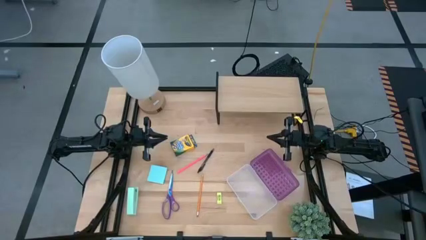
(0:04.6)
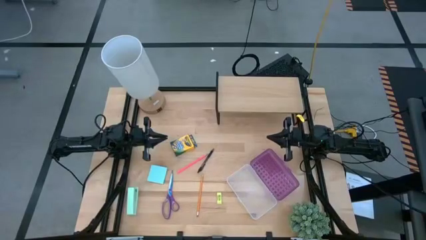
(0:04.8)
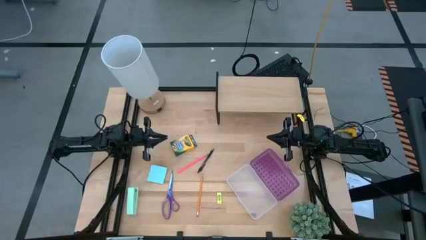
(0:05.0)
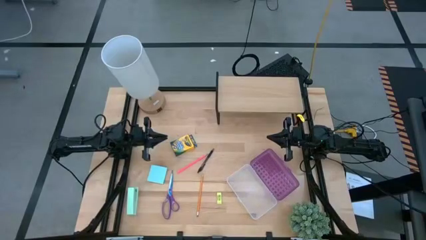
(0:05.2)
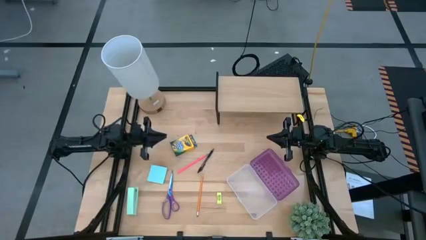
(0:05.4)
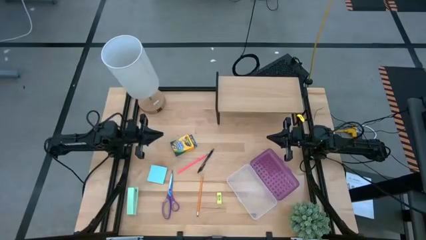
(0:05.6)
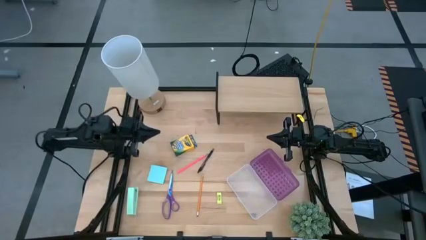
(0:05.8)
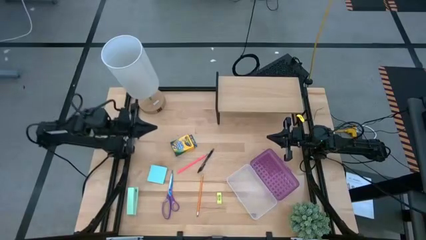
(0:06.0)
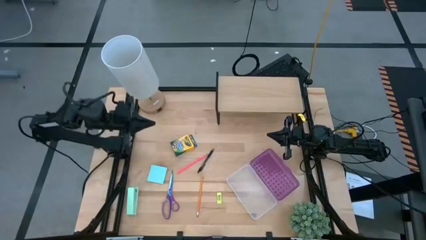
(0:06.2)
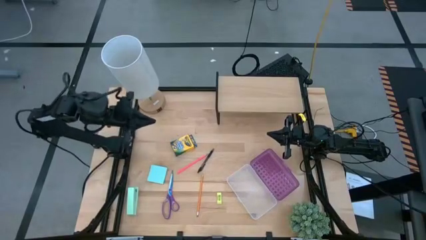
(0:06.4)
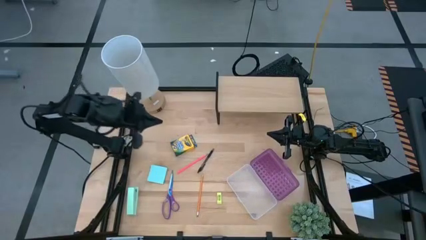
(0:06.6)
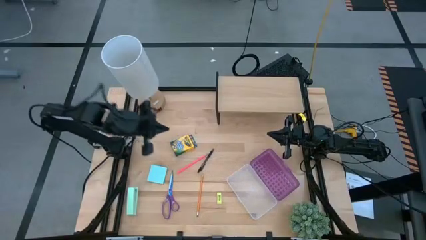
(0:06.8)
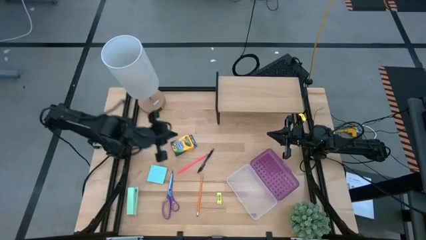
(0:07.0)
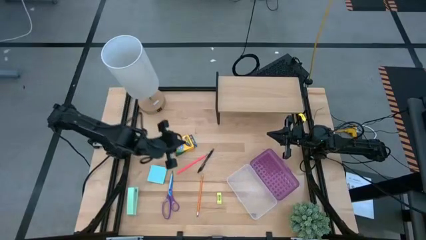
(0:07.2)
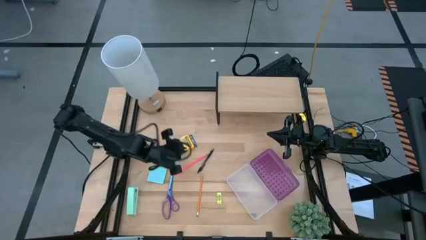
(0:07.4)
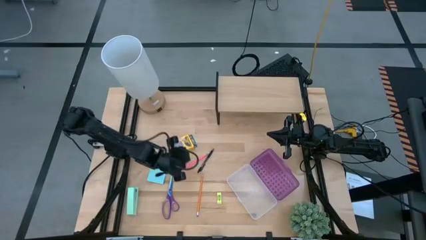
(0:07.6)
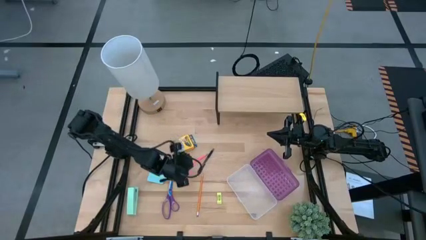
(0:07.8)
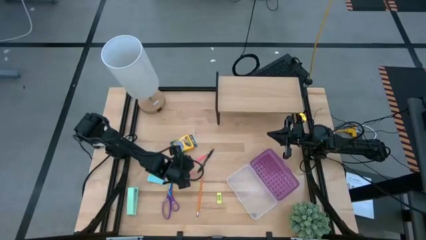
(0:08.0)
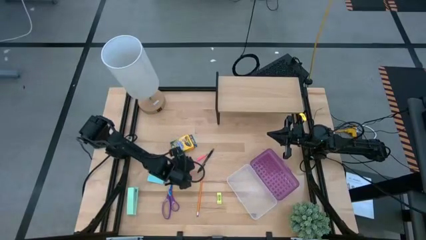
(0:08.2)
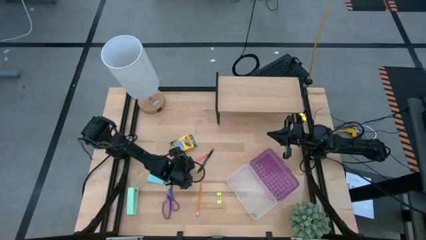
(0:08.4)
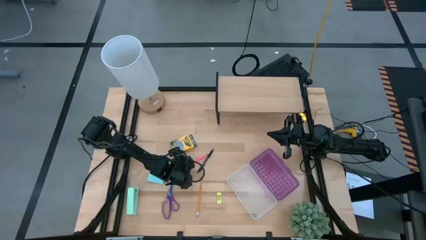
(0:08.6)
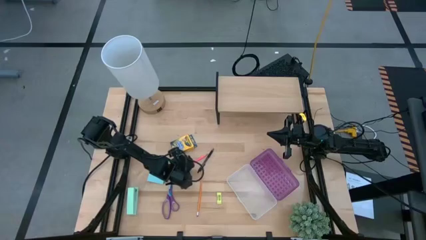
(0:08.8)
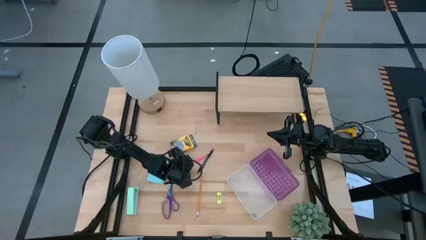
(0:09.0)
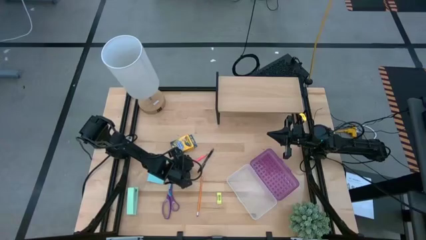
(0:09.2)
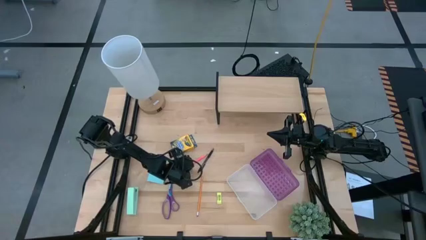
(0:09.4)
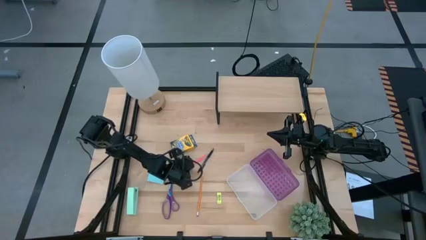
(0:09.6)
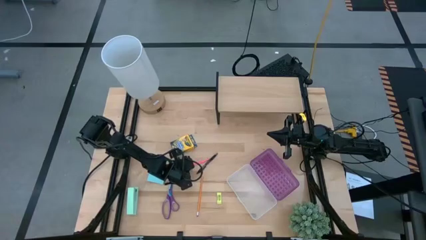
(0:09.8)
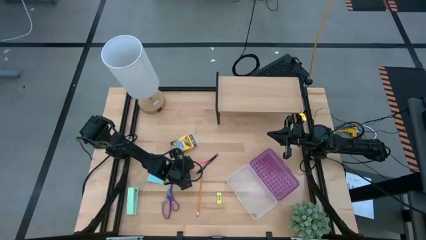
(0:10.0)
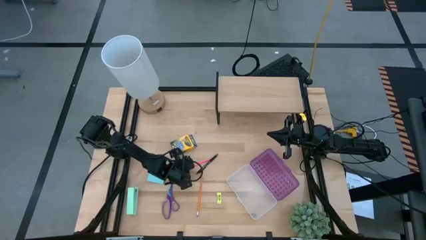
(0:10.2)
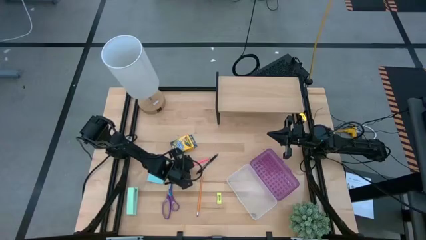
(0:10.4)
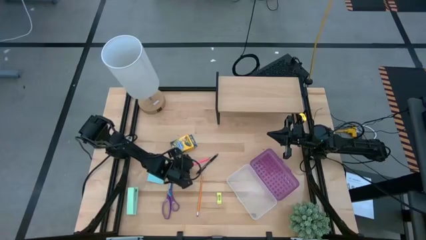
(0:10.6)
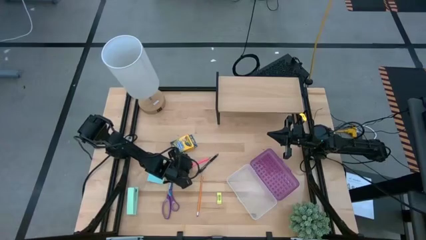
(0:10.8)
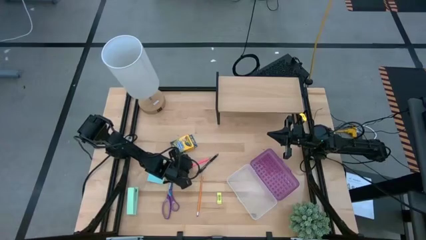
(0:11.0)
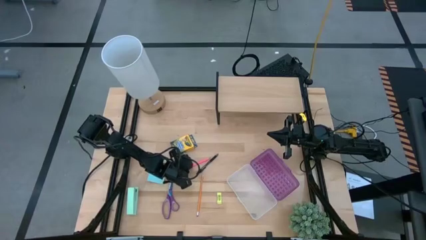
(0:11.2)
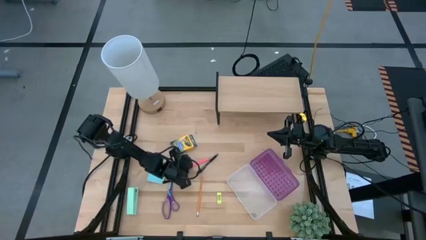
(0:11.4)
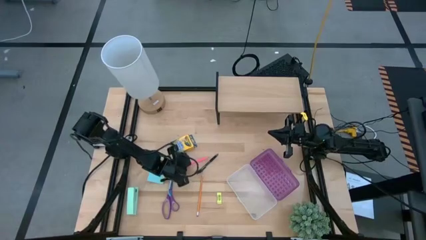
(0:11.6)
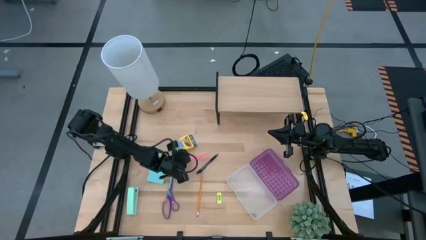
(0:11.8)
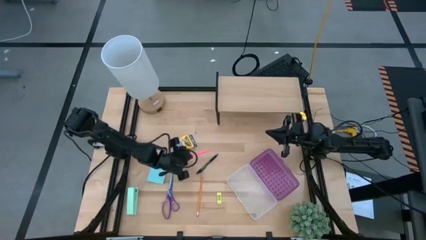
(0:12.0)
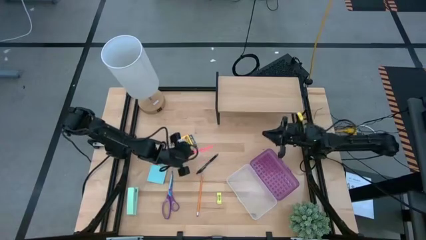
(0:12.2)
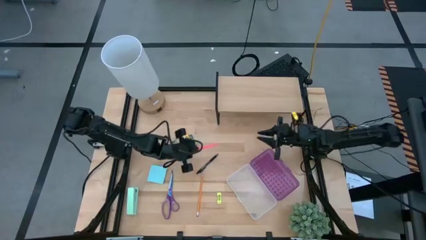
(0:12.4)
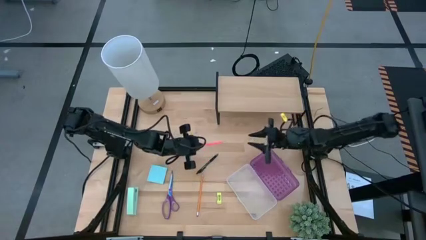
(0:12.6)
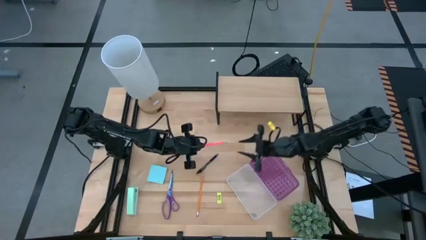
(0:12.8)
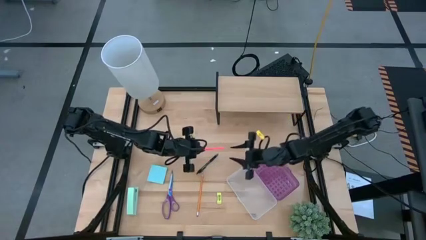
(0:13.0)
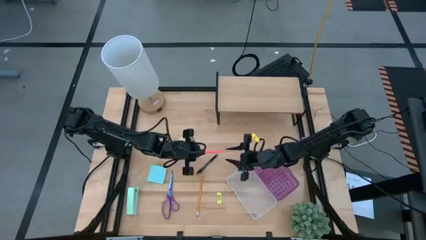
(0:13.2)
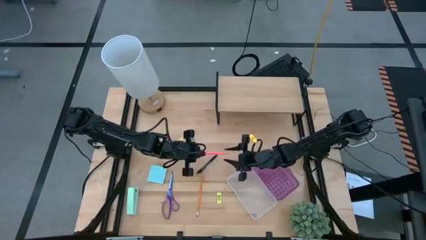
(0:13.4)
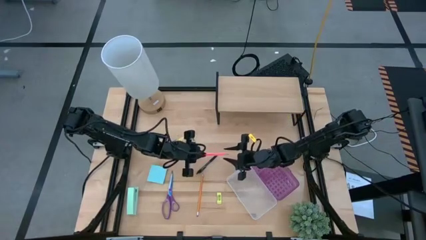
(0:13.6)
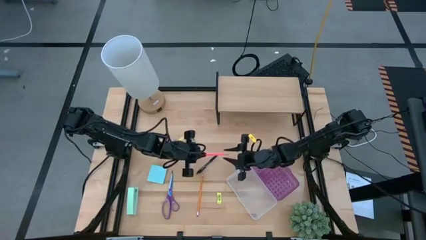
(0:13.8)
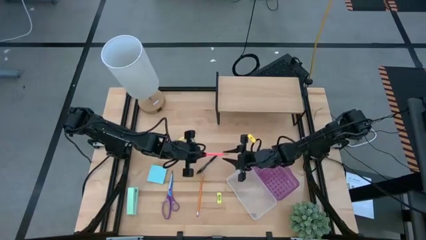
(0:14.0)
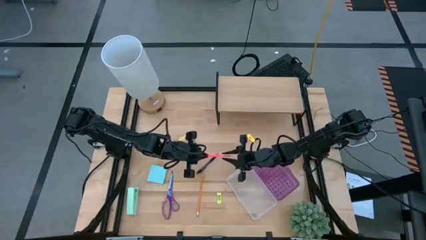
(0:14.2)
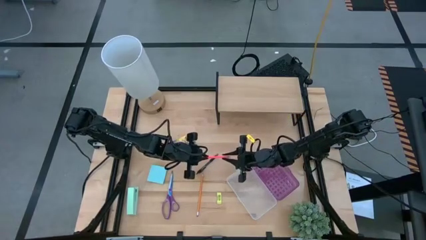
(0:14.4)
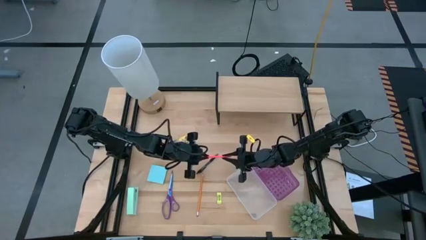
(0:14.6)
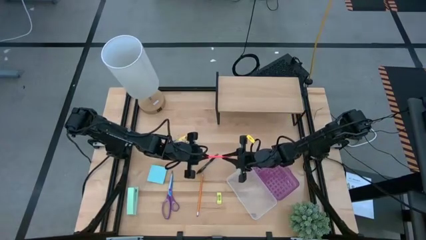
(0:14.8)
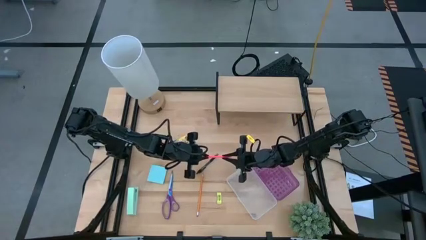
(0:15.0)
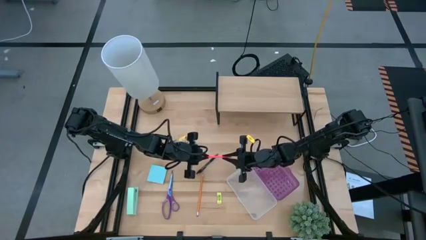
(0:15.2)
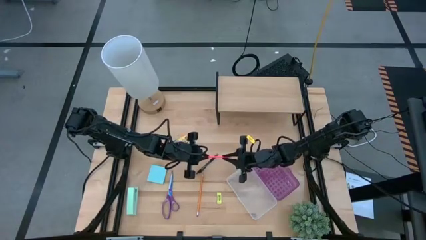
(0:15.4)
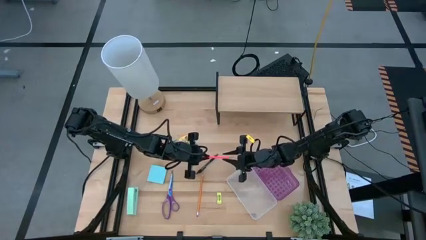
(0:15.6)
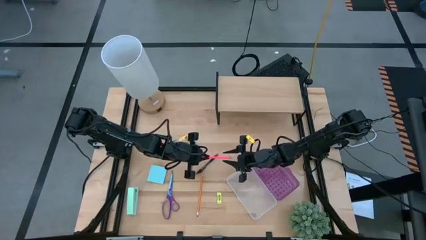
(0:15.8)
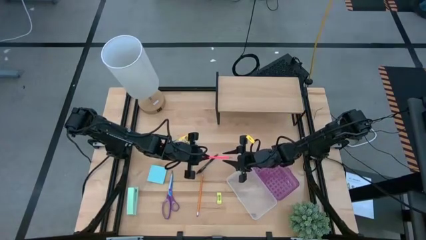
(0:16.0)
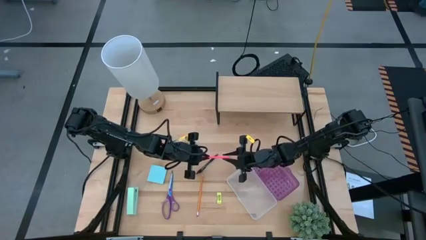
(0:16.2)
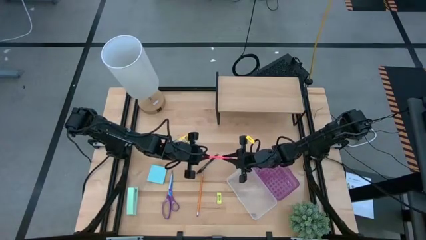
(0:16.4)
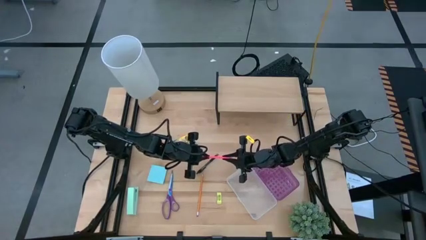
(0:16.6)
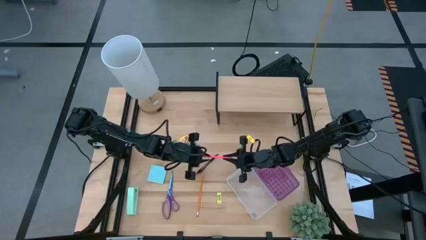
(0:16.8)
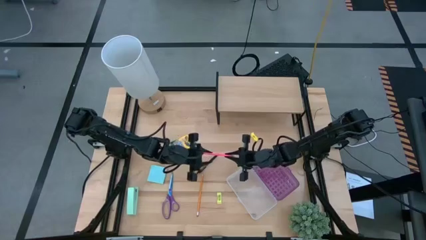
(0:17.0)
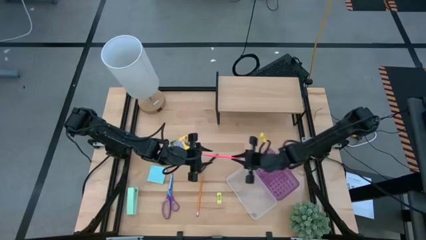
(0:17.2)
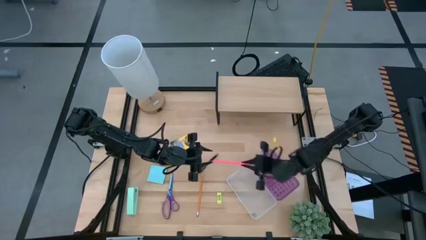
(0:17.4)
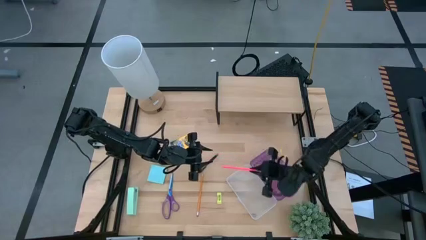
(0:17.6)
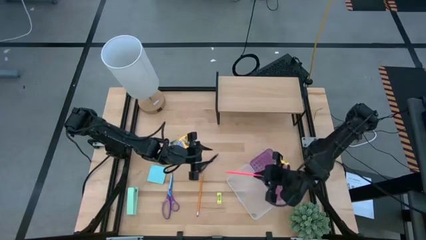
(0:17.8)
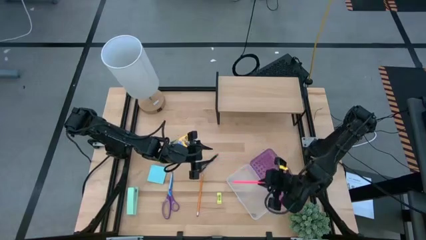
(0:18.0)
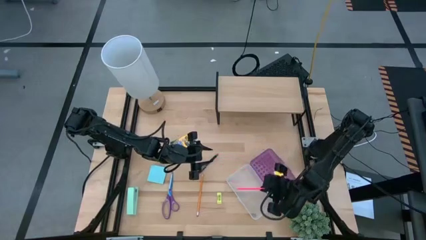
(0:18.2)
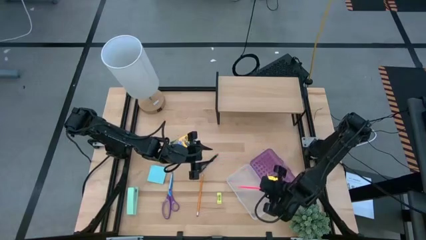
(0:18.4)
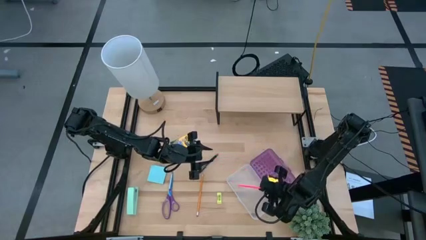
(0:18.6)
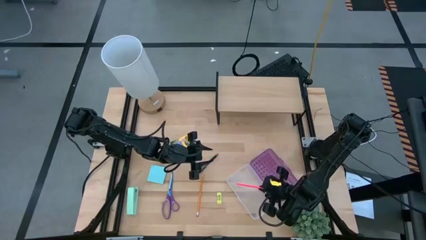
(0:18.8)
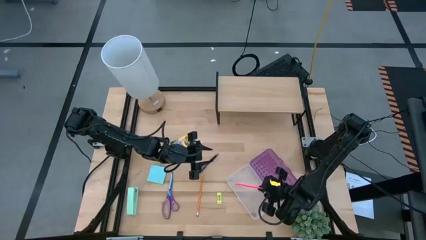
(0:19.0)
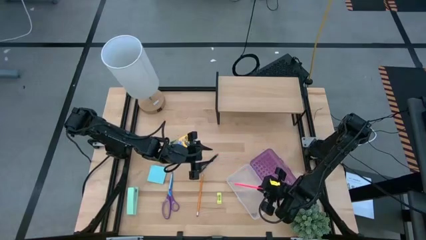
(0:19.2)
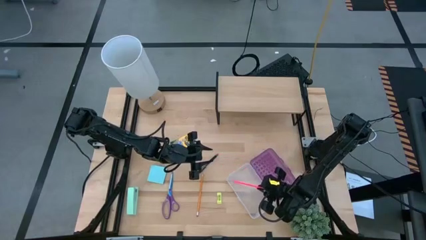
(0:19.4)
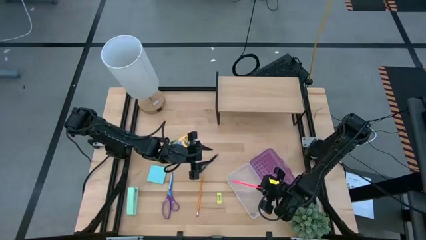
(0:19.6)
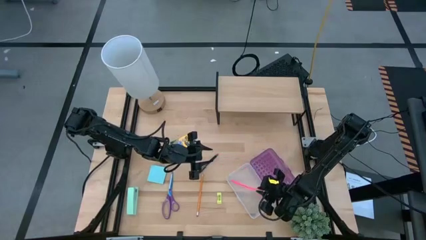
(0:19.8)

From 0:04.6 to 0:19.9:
Task: Pack school essentials
Put the pink pencil into the purple supply box
